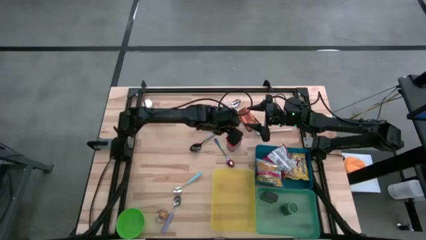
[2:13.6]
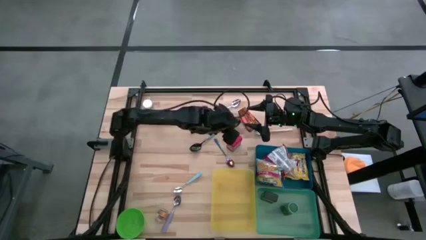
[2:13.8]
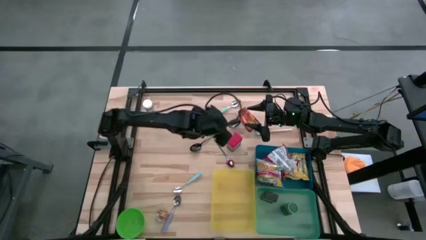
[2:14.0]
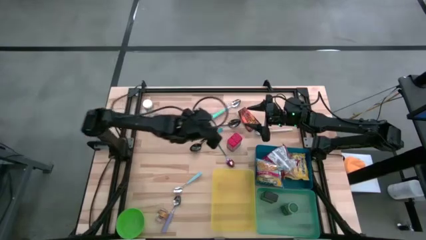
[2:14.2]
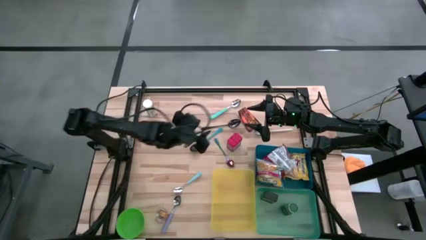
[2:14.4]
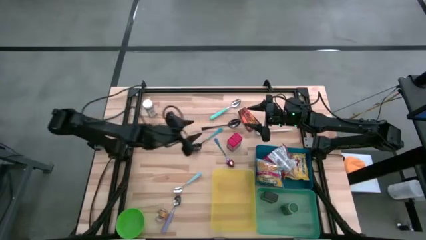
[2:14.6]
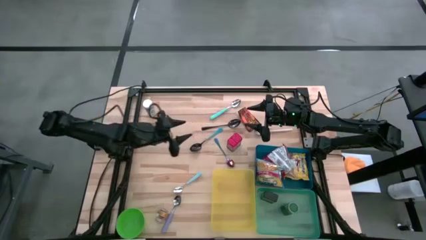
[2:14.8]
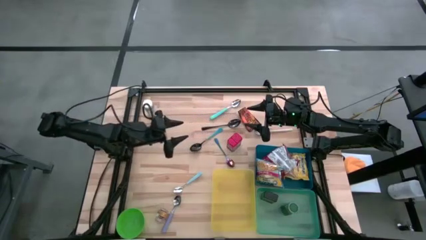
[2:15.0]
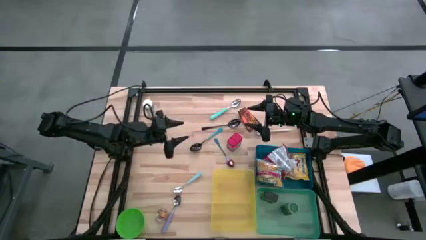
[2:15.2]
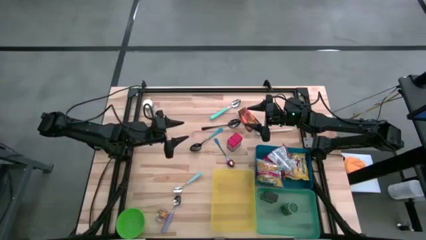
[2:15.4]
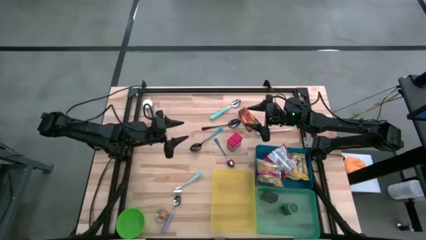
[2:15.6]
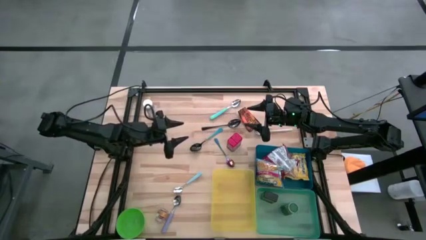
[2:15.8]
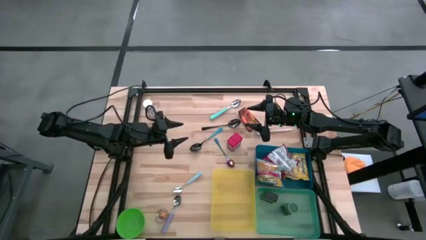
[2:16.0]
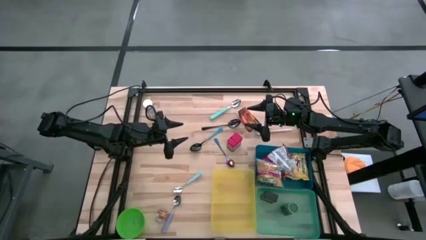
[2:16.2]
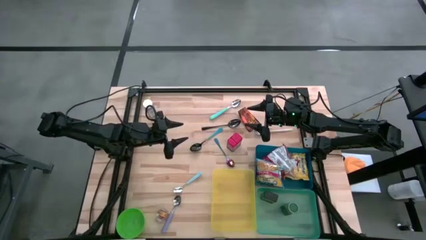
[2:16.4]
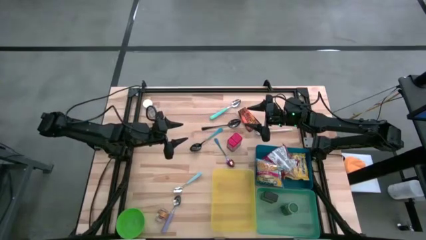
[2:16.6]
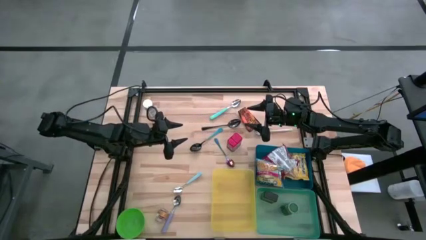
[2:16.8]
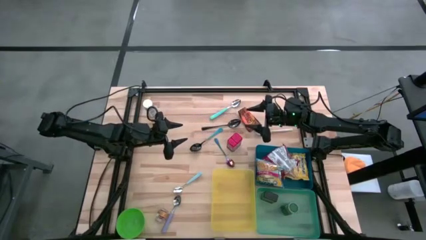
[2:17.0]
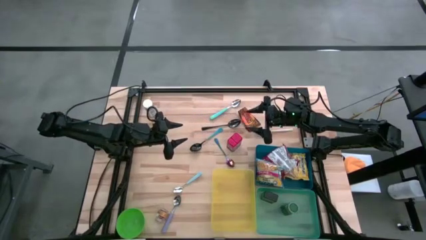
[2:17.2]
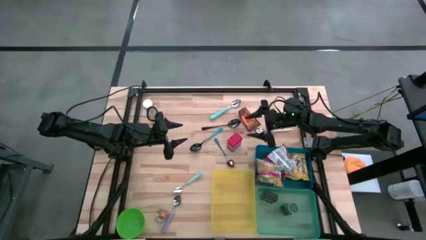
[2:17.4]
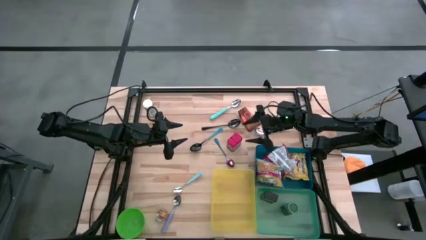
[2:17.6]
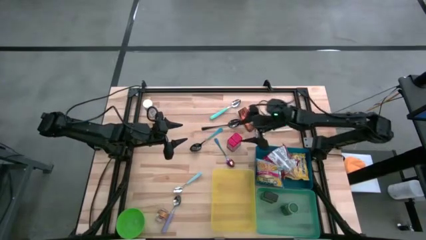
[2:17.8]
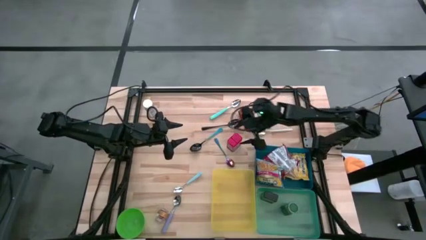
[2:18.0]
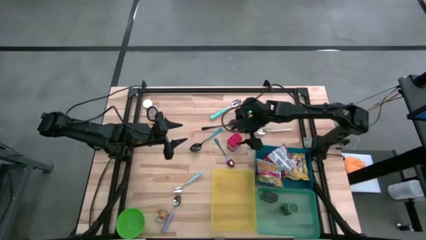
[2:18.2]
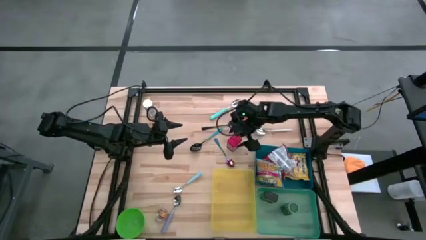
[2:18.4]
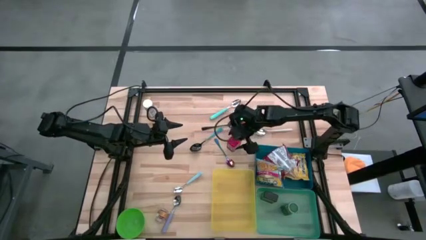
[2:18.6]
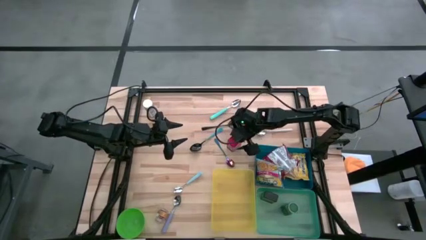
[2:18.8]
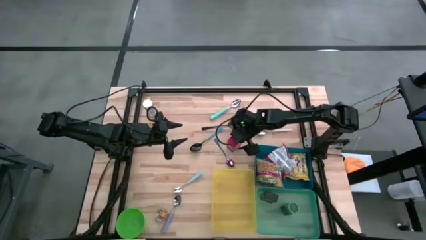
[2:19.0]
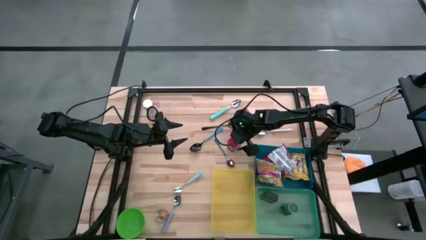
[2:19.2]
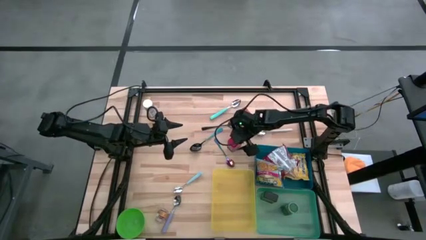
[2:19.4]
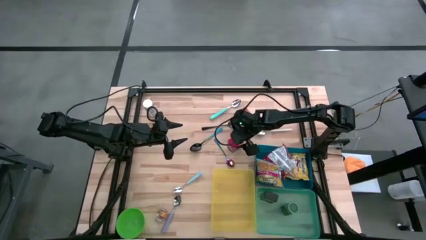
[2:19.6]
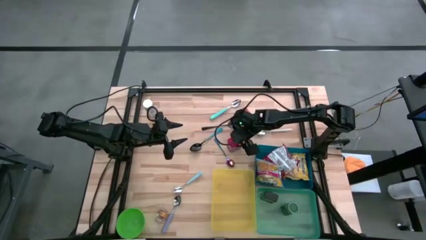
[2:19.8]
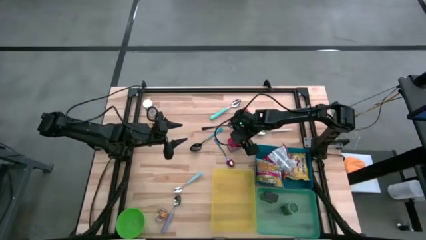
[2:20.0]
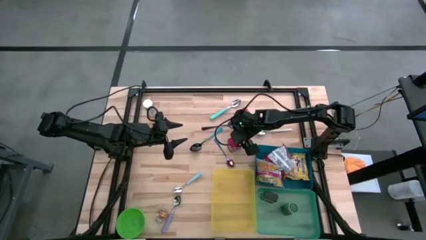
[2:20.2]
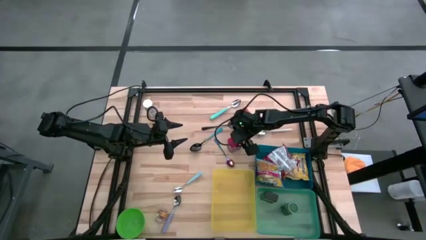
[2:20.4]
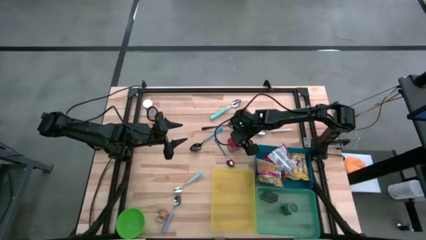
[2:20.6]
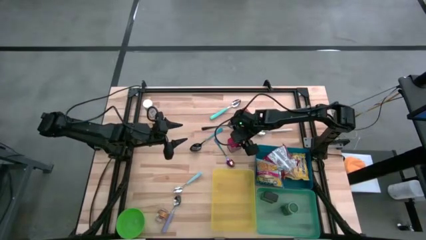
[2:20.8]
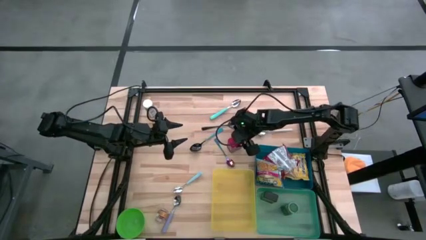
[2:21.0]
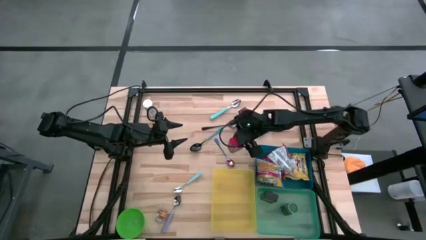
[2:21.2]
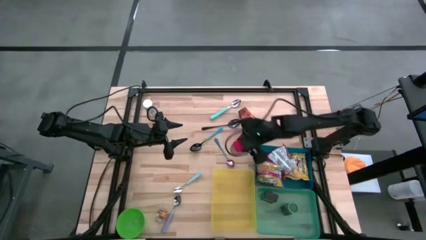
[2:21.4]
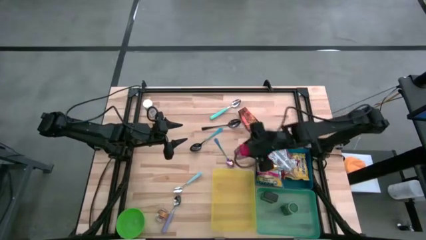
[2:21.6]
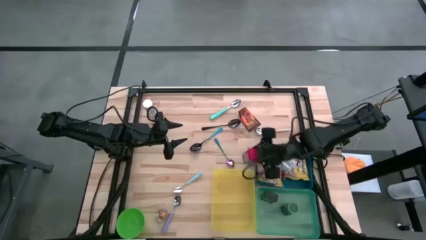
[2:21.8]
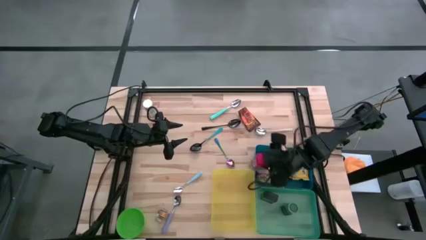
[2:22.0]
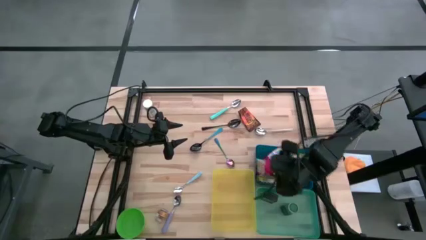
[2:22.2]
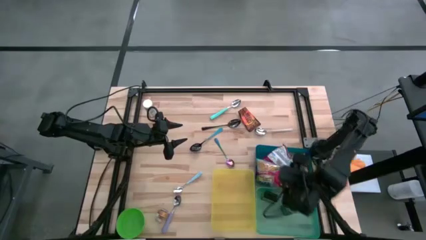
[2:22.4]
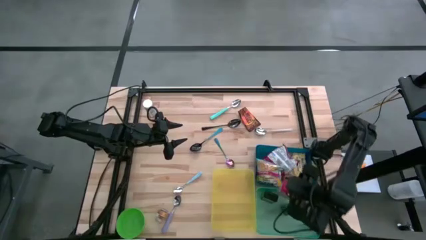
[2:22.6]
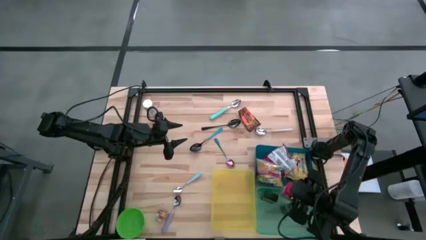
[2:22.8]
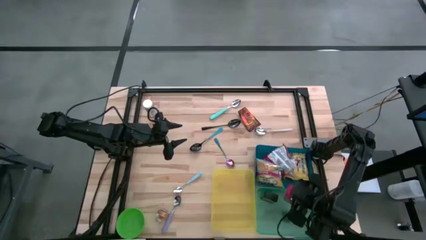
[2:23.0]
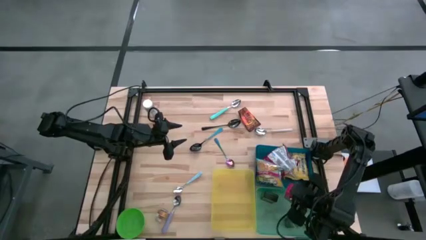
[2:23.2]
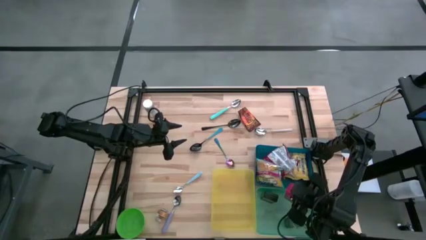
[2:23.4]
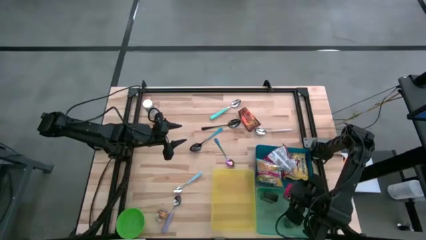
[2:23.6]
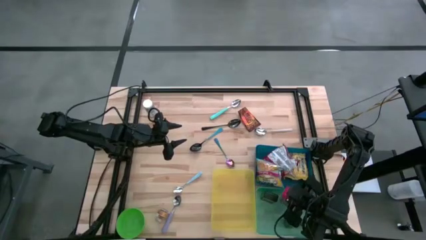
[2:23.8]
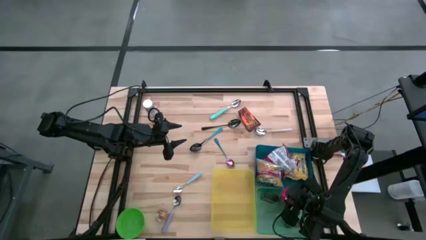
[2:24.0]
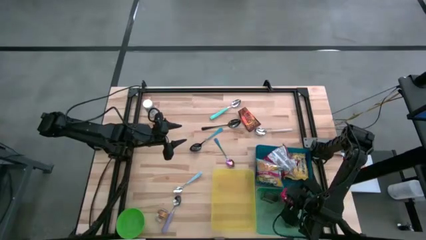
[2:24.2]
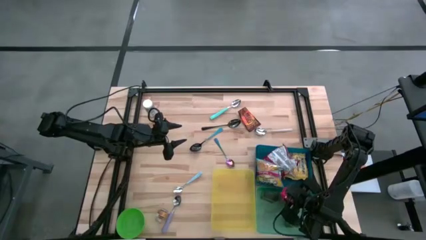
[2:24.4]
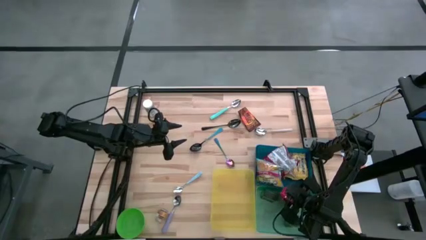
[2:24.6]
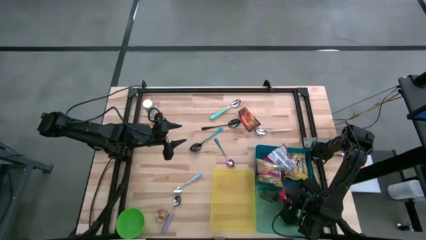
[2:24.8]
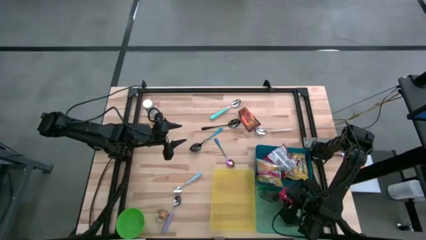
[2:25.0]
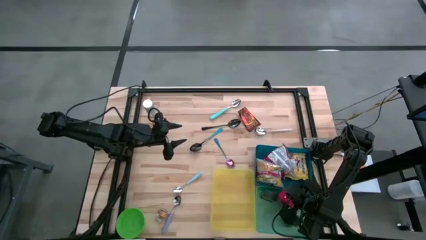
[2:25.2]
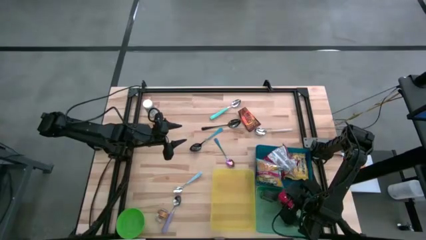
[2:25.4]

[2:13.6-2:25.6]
Put the red seasoning can into the green bin

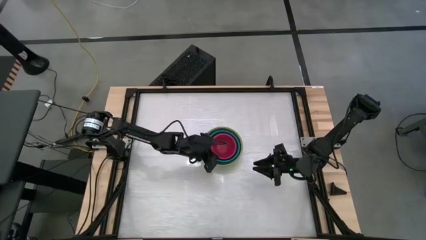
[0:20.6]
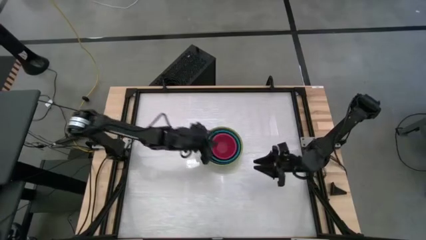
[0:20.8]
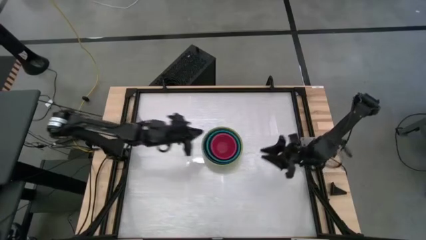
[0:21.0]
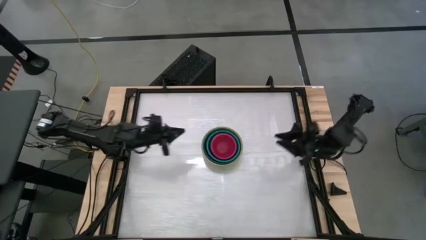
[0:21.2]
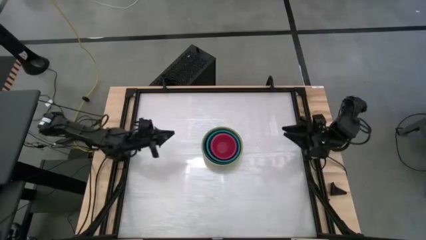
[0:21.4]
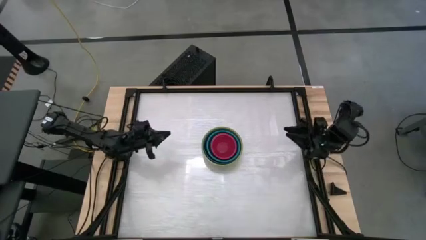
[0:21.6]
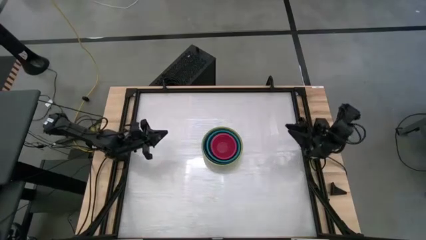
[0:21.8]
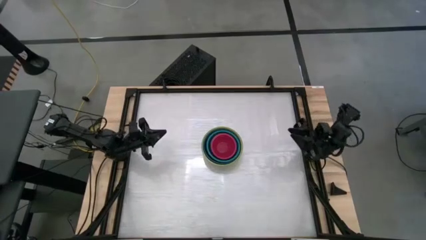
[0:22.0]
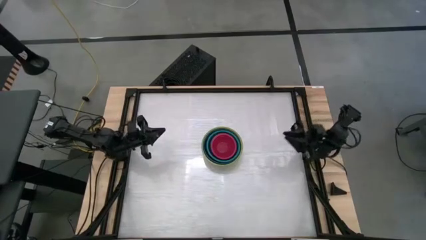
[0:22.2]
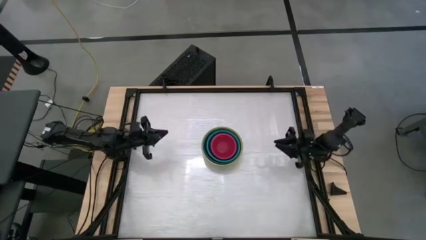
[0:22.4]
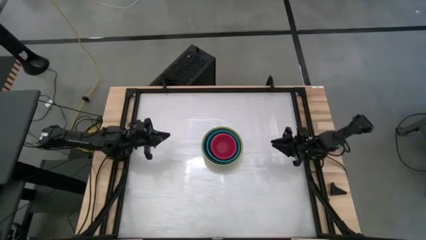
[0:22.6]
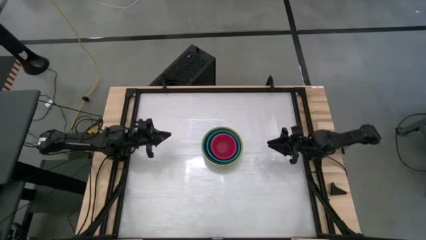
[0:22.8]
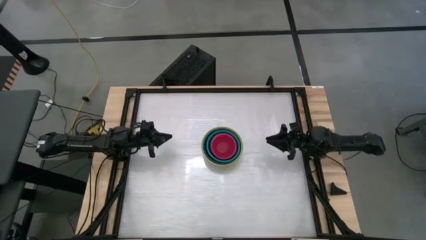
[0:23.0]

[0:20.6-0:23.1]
Return to Home Position
